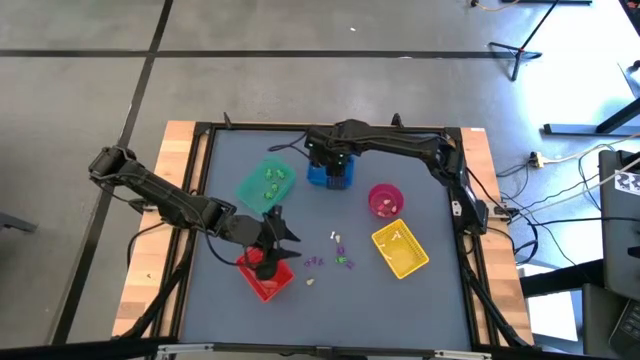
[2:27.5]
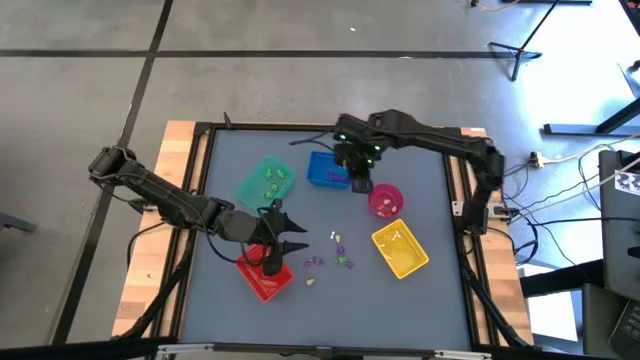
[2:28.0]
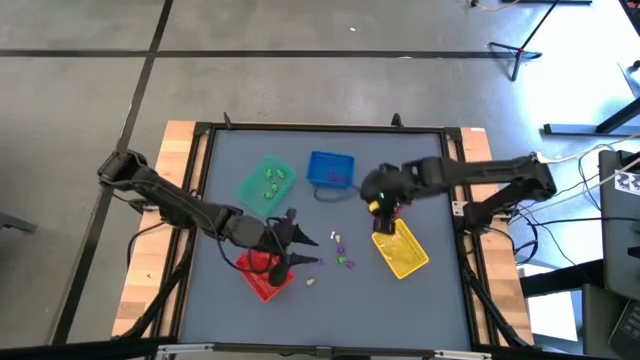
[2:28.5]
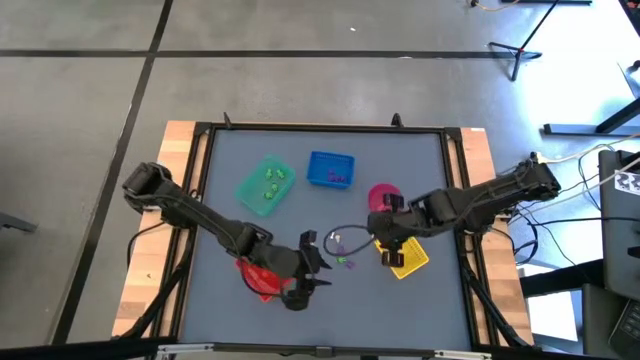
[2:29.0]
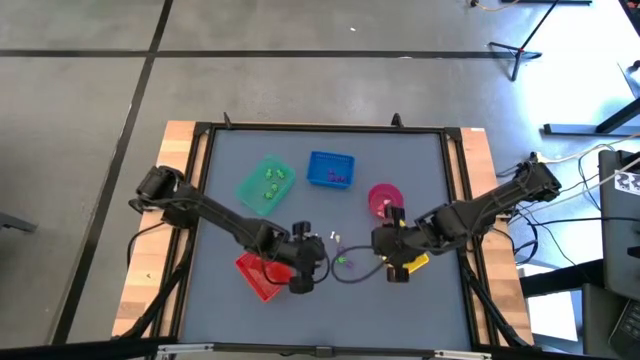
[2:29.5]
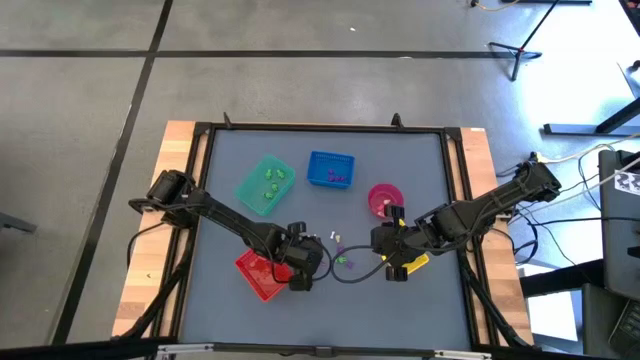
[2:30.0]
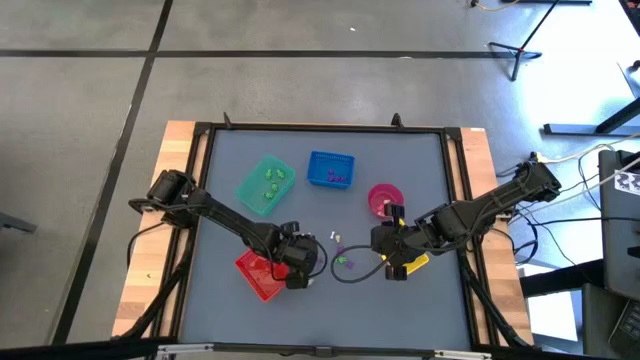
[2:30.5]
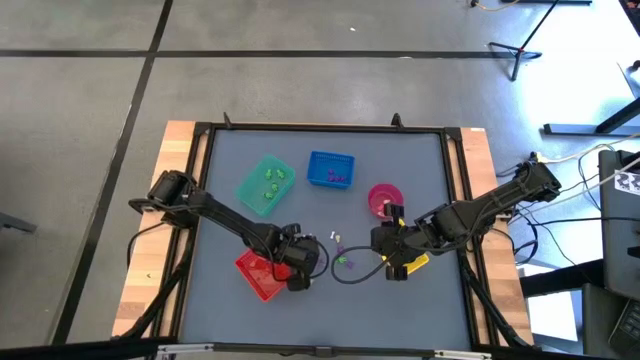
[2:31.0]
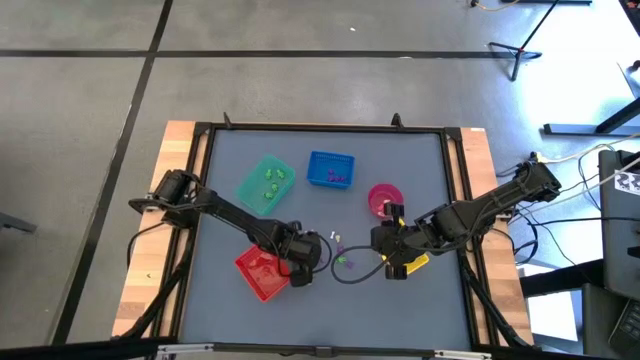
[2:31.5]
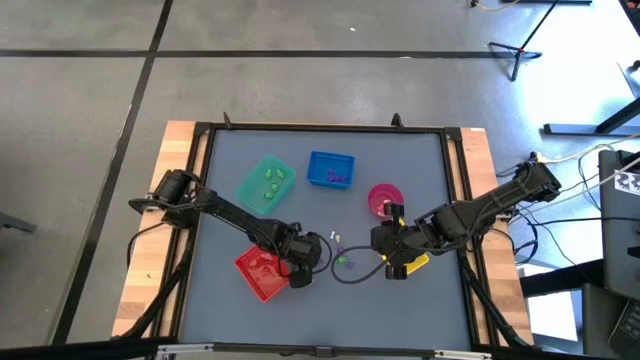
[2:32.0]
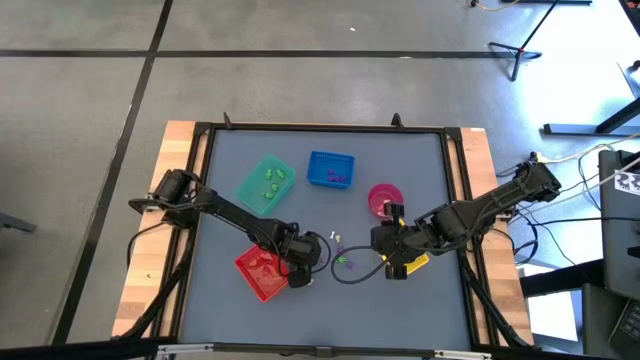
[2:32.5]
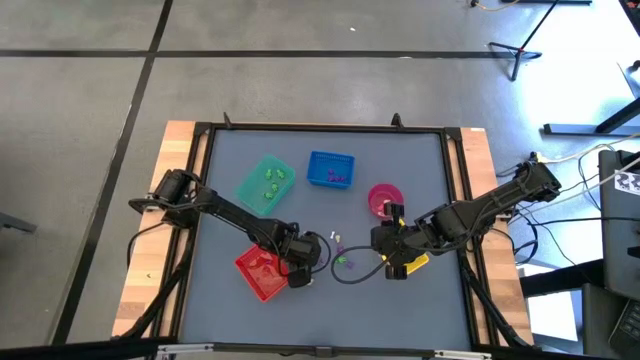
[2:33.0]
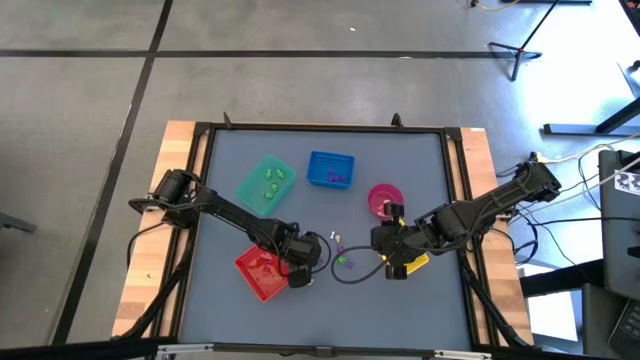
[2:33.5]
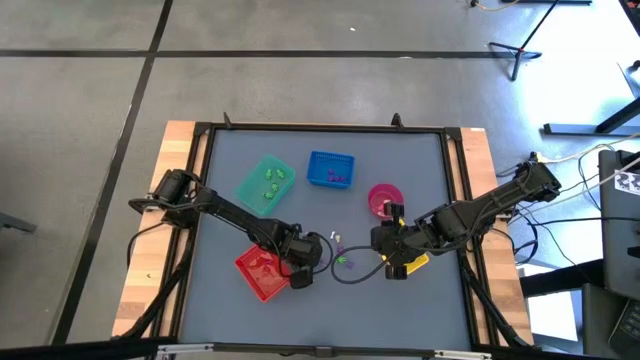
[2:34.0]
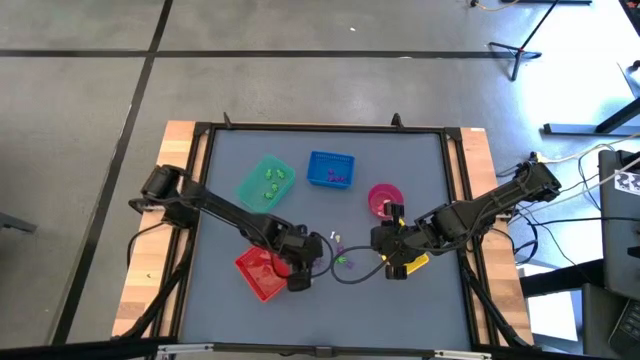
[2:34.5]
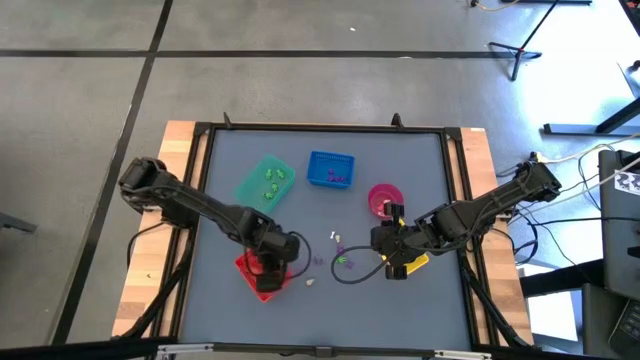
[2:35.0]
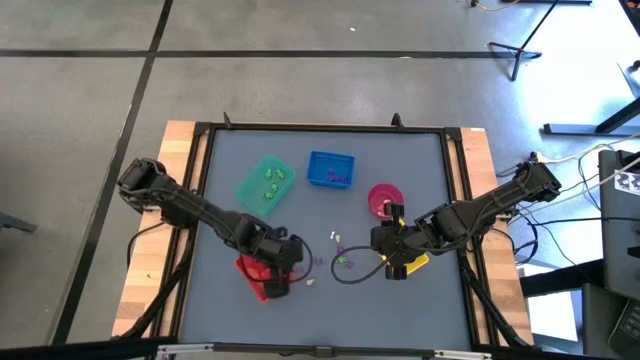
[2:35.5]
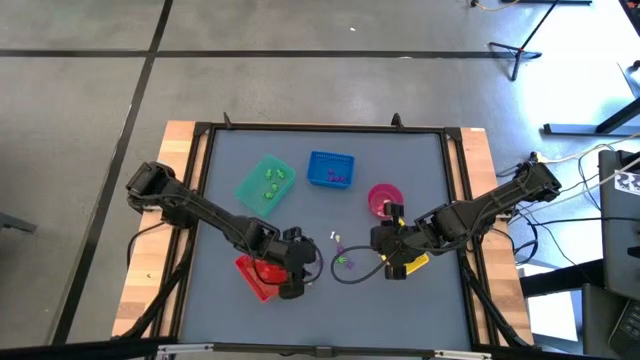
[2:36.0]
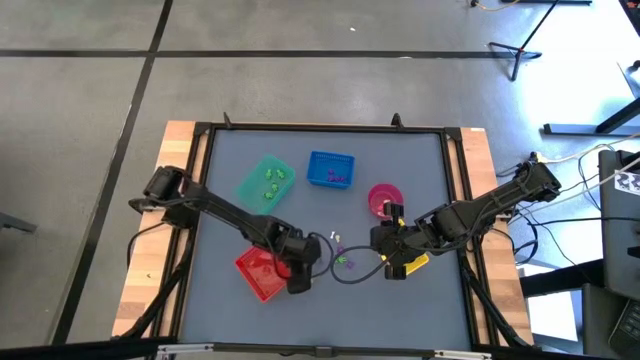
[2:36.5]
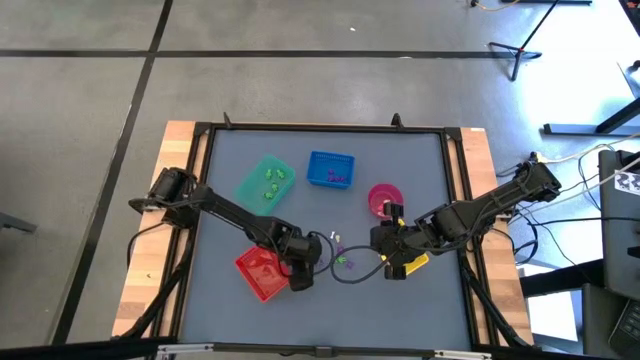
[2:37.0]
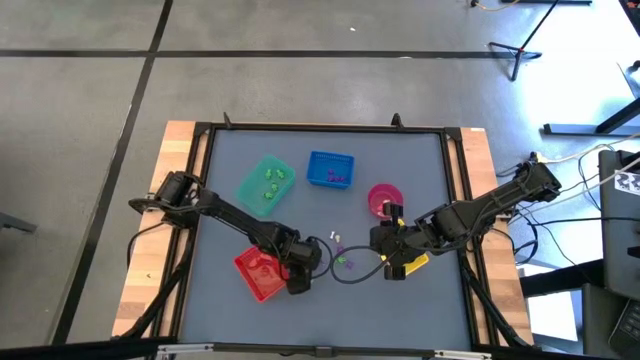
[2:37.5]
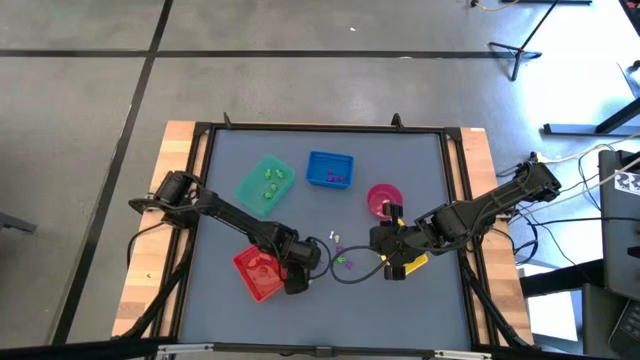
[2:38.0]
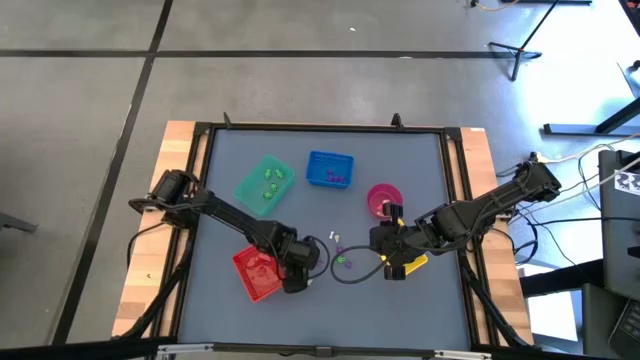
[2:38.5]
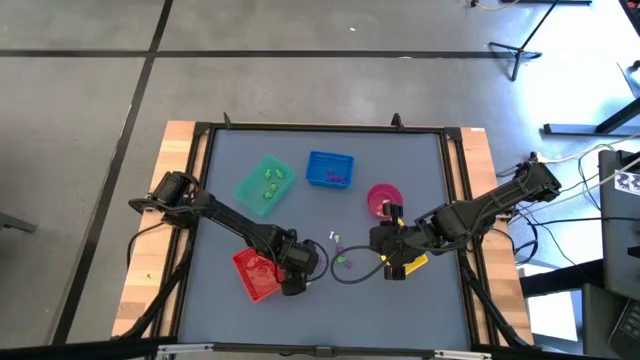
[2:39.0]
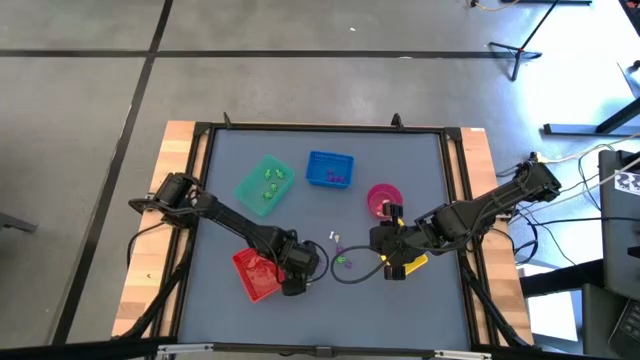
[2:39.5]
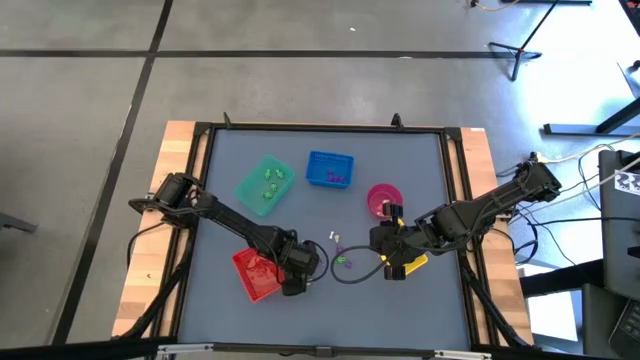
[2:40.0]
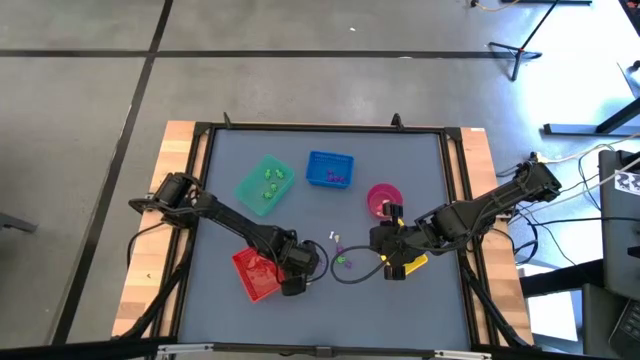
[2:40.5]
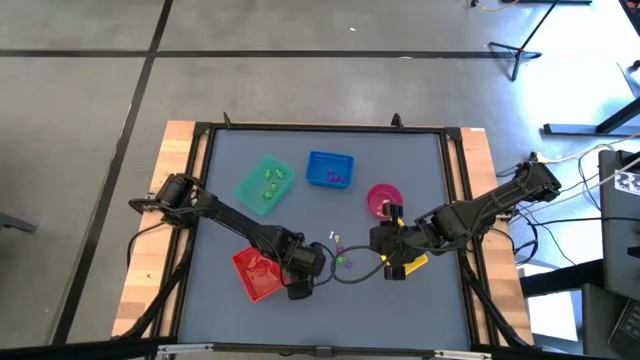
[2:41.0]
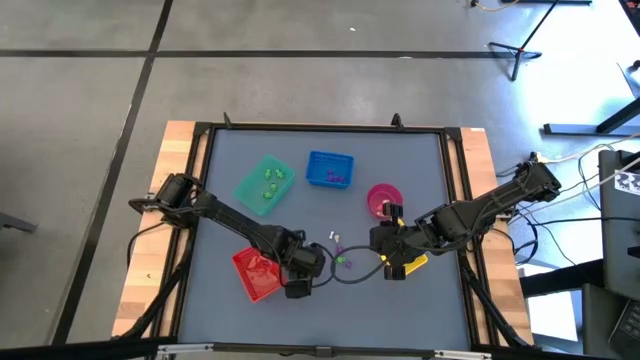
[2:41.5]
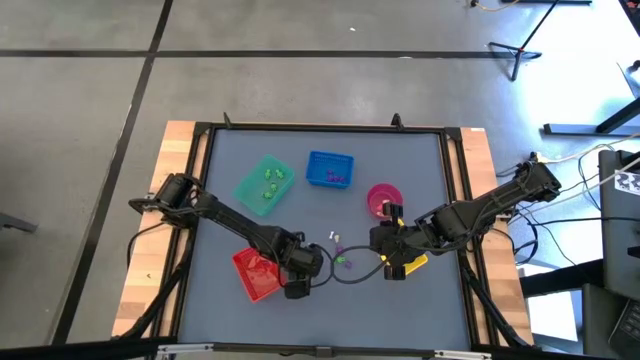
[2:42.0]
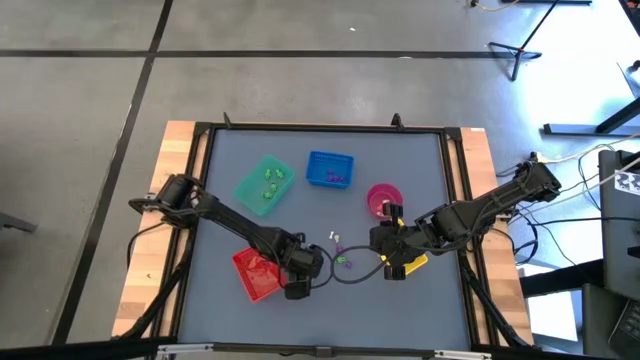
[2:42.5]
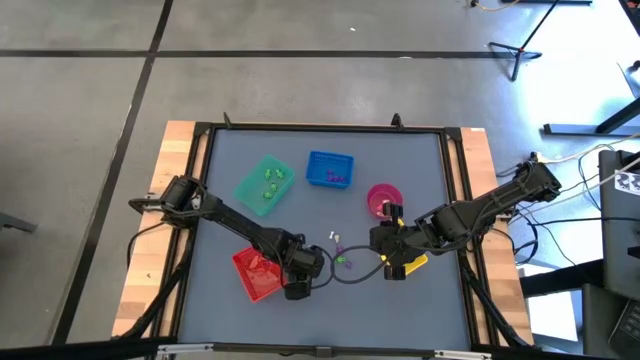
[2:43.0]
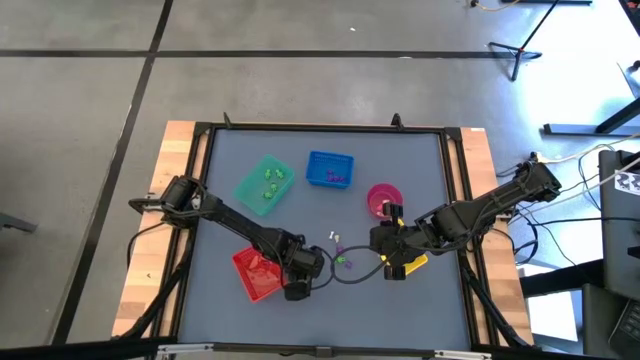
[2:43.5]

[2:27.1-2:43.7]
Task: Sort Halloween decoration
Put the purple witch hat toy into the orange bin

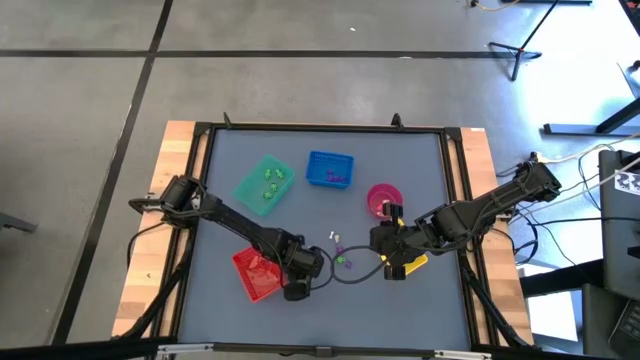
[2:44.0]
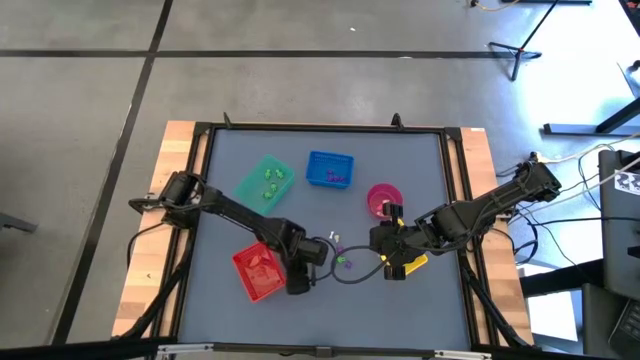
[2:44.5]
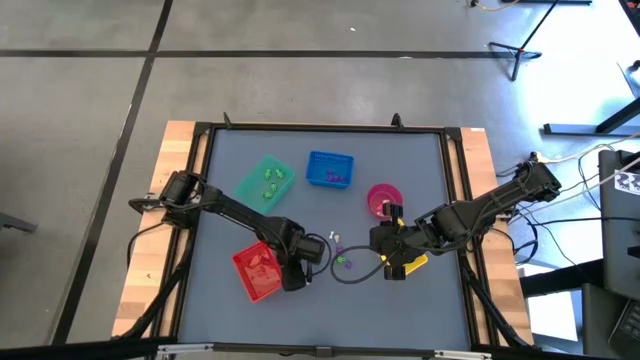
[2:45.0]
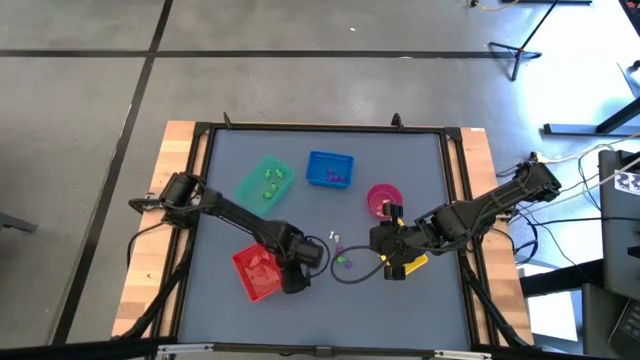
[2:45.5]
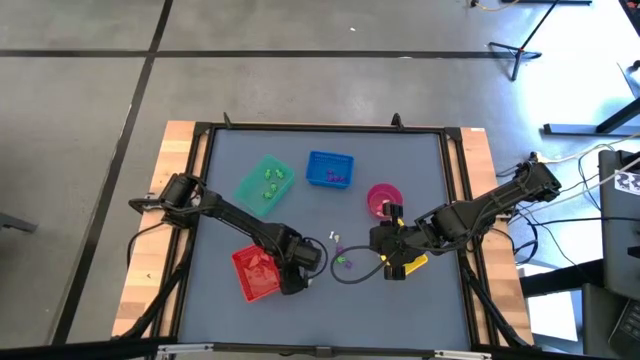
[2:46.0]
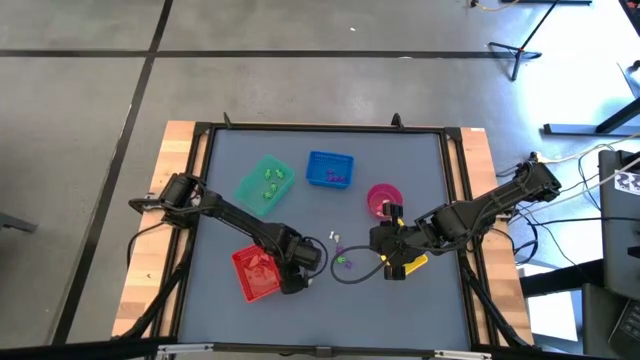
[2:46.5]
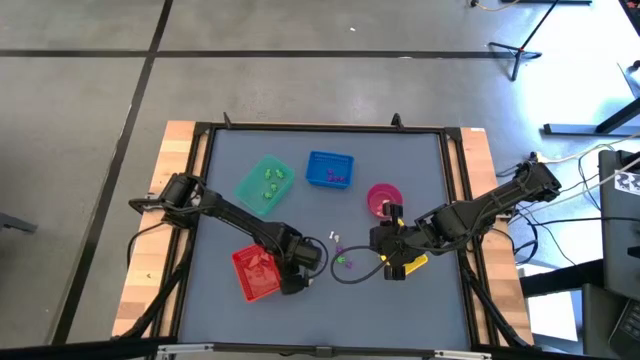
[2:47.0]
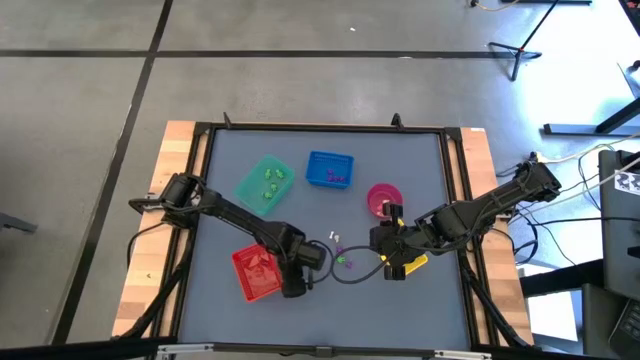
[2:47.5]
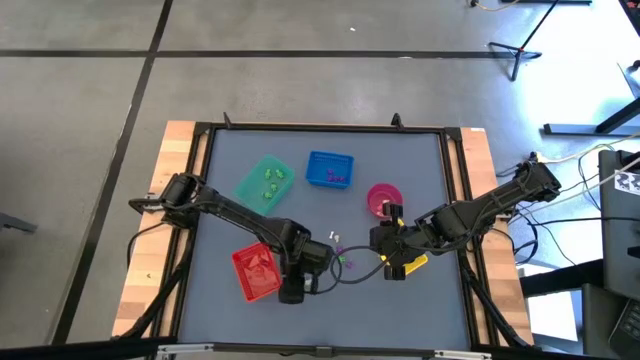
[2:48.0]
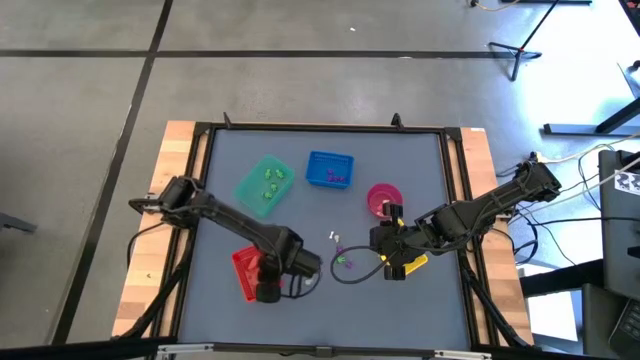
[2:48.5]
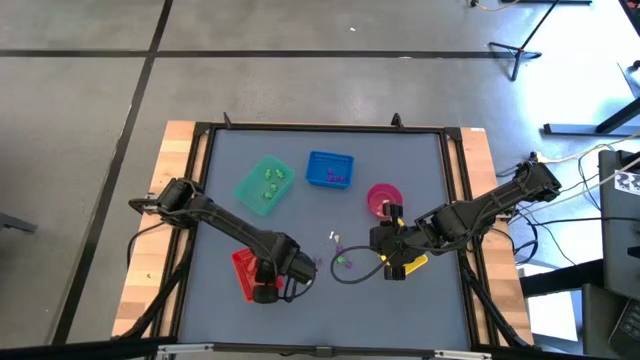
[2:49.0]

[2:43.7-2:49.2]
Put the purple witch hat toy into the orange bin

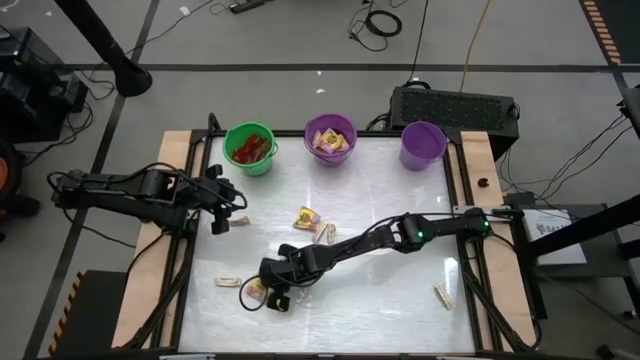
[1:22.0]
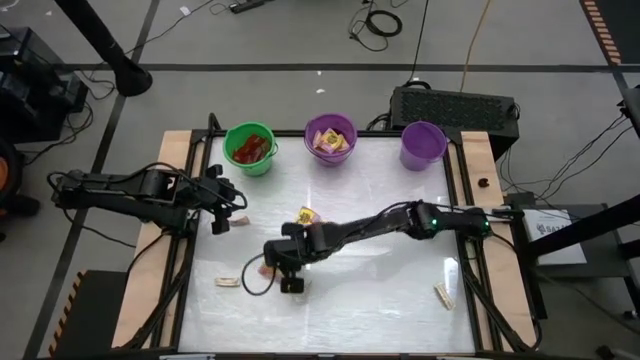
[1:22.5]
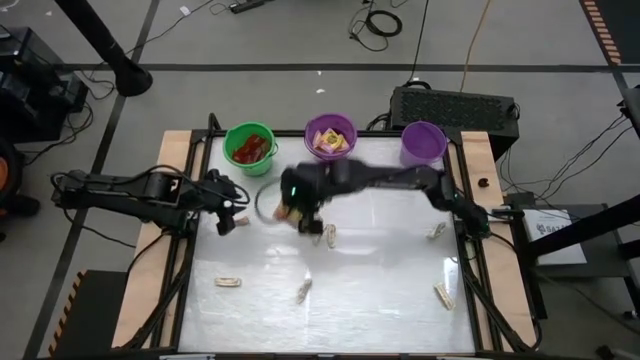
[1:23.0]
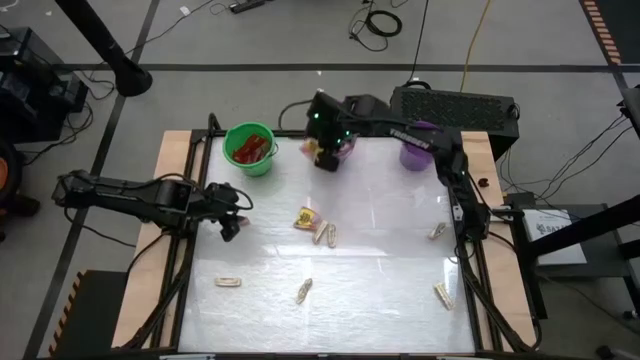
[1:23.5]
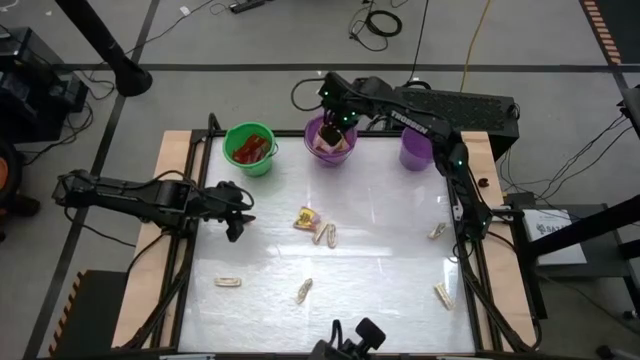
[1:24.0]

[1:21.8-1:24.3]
Task: Sort candy by brand, put in halloween buckets
Put the yellow candy pack in the left purple bucket
